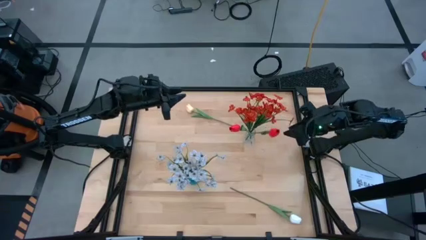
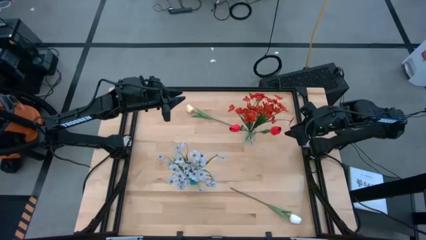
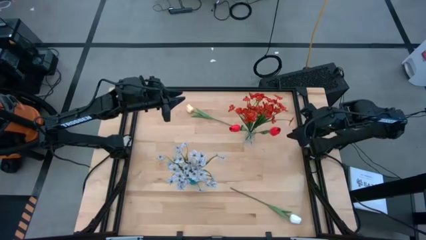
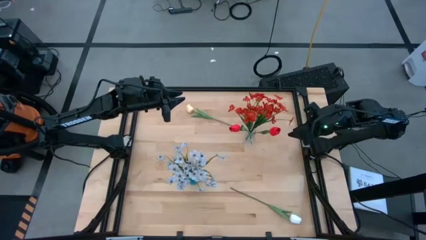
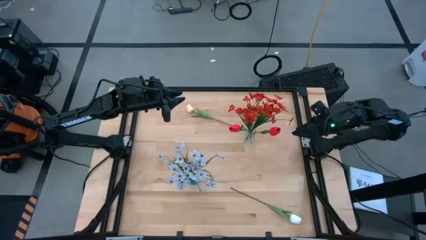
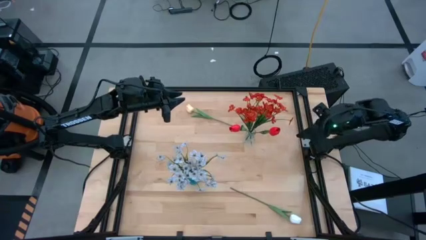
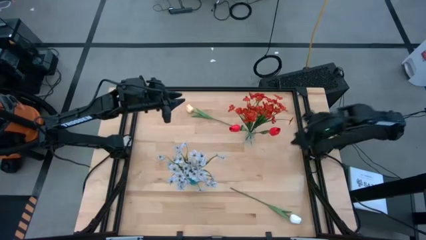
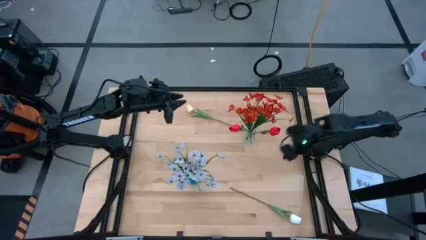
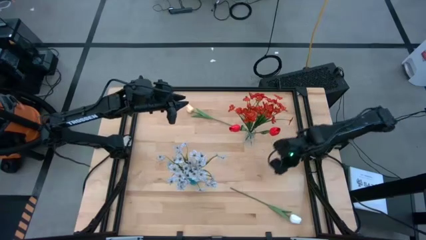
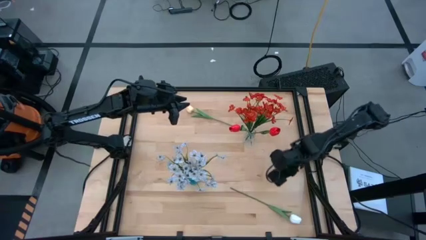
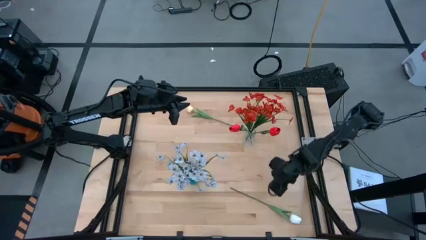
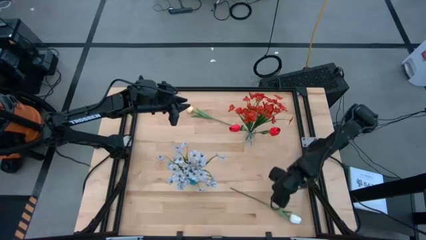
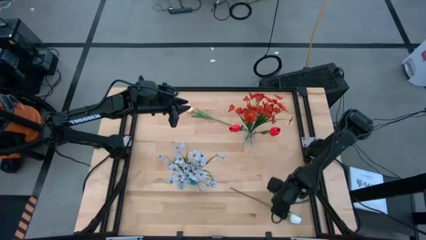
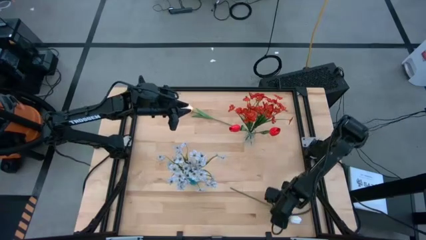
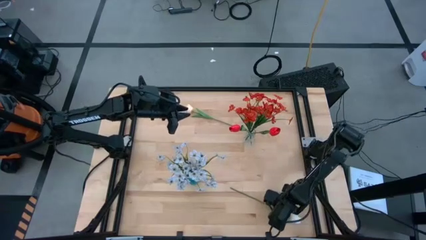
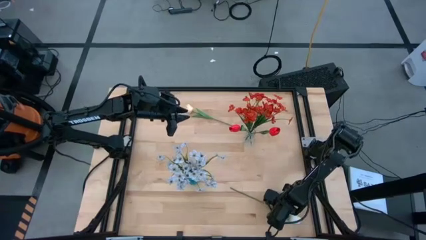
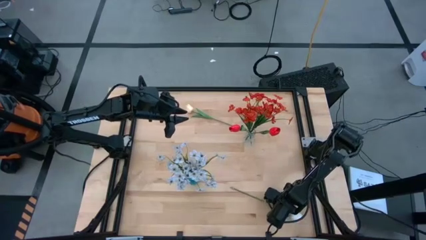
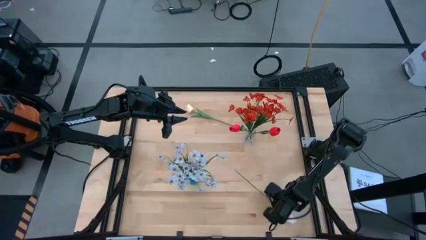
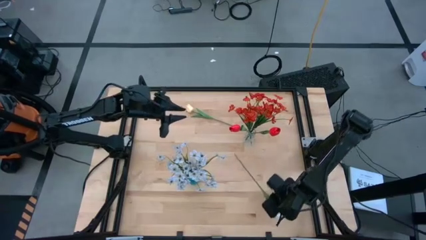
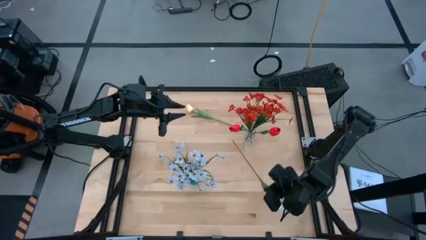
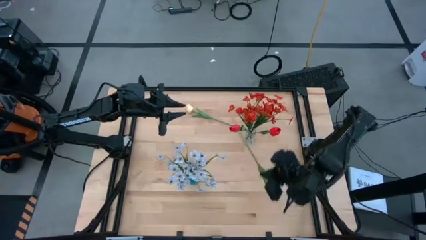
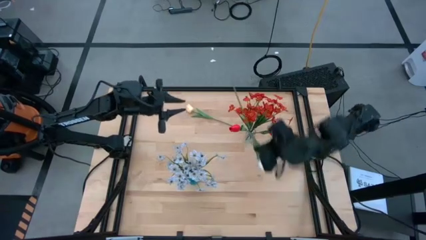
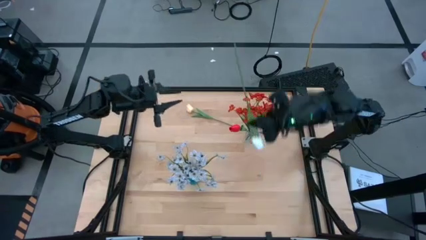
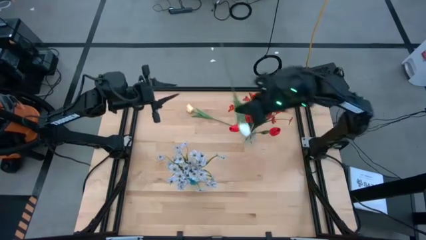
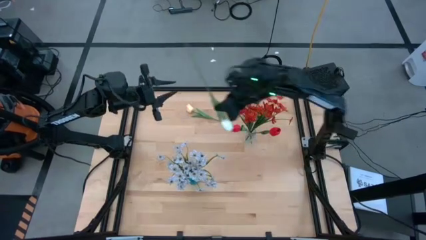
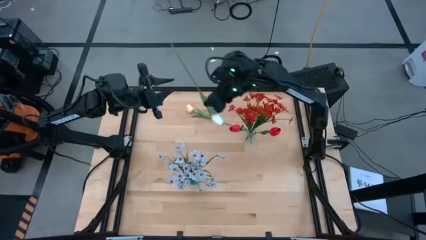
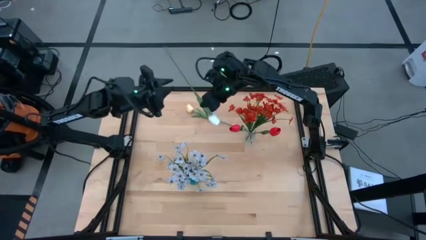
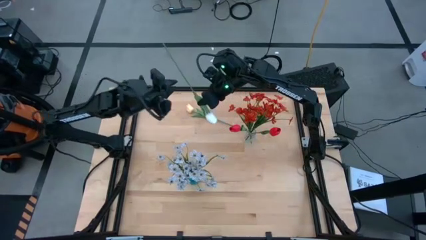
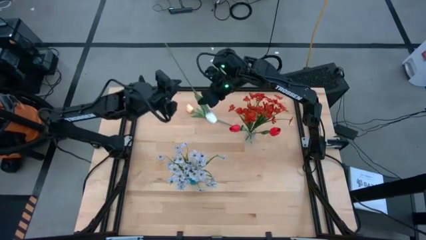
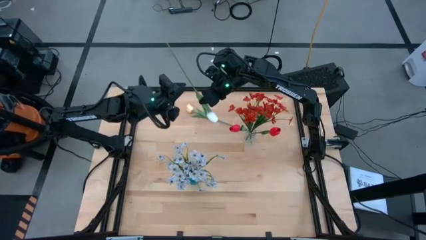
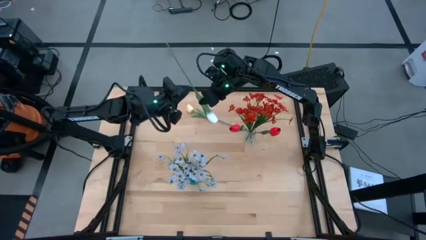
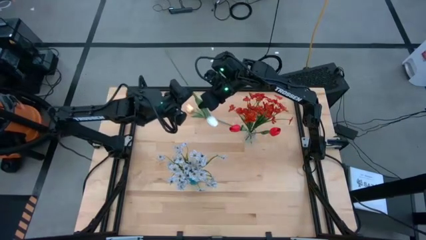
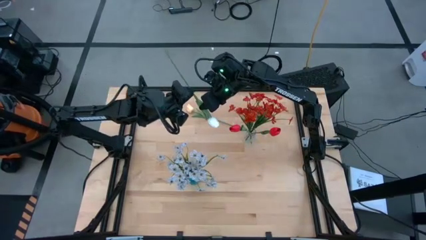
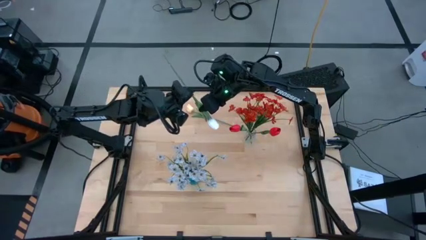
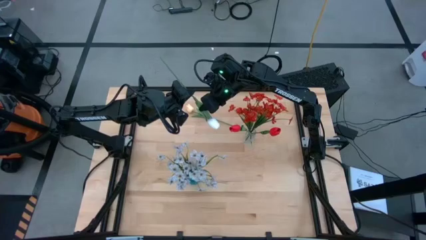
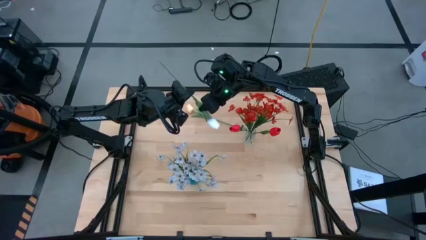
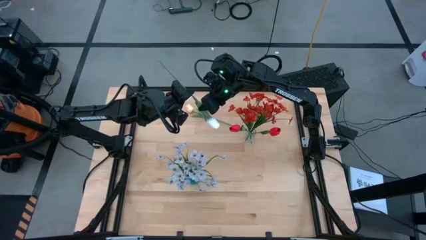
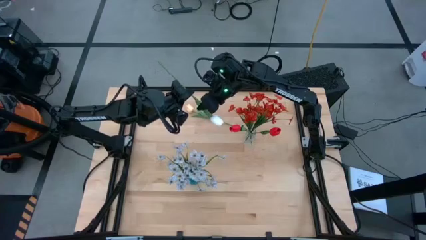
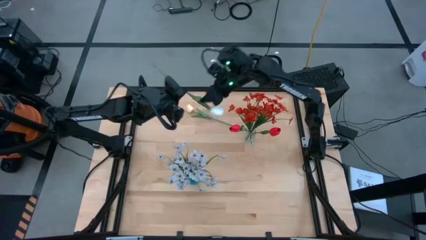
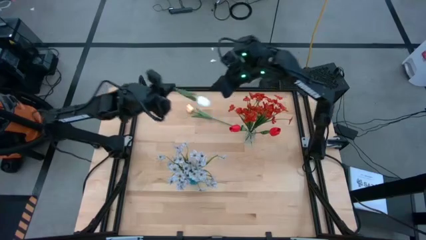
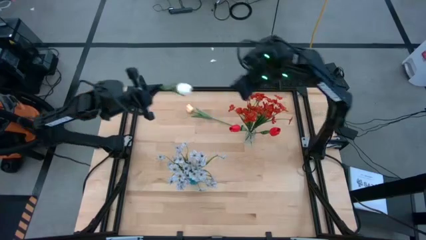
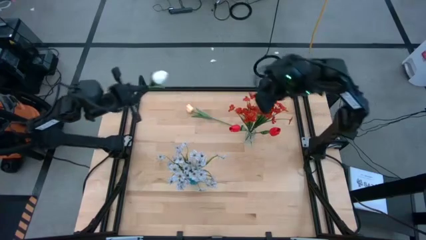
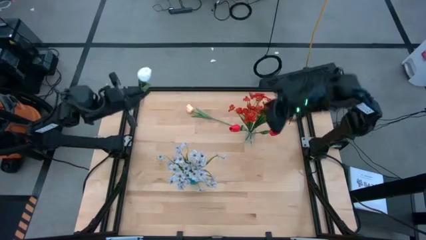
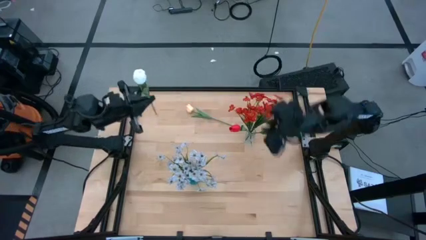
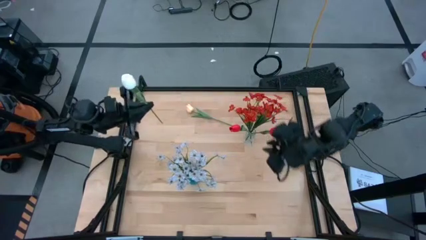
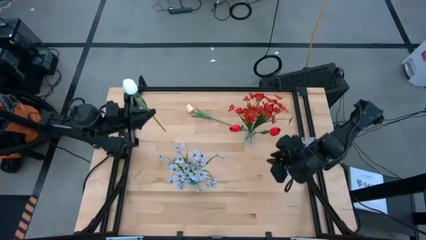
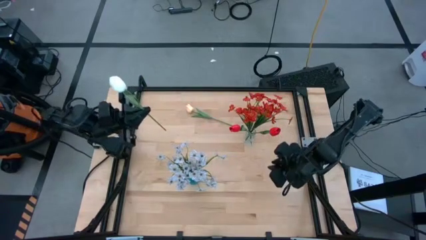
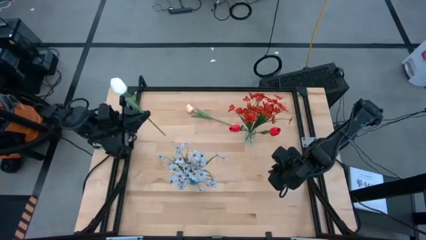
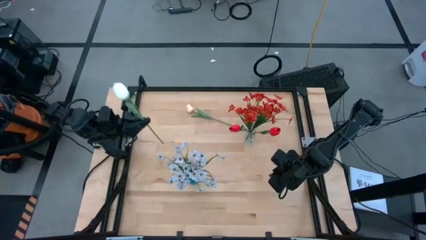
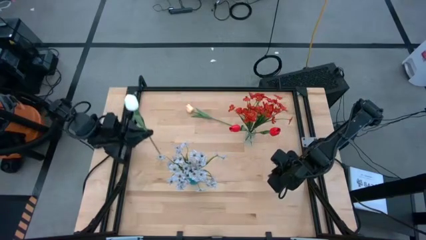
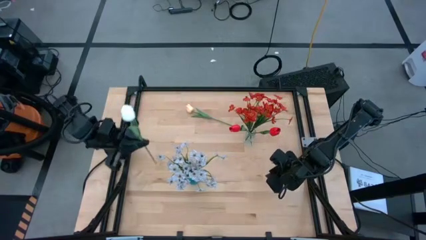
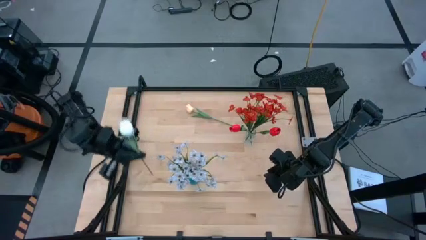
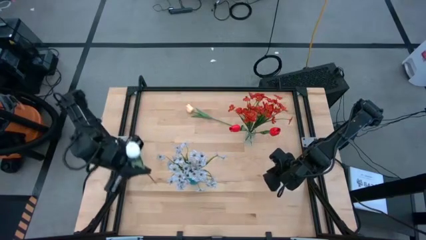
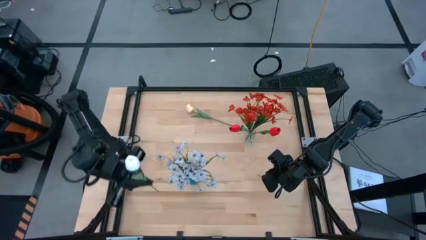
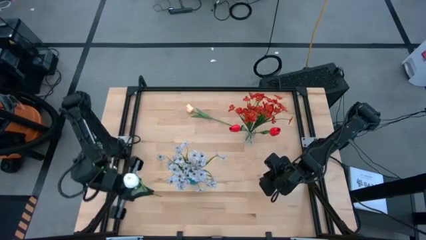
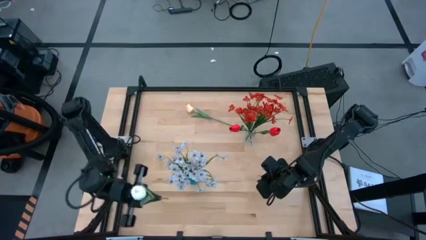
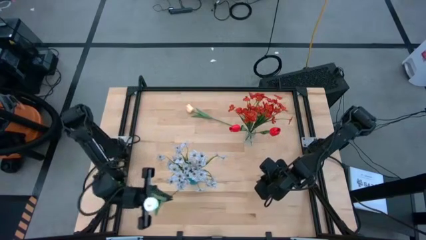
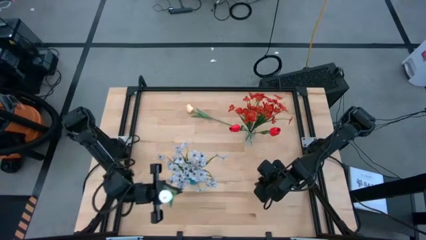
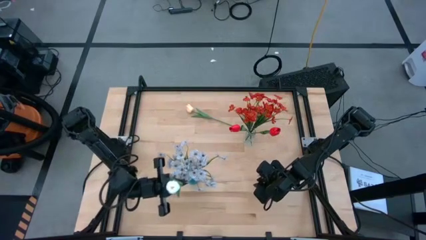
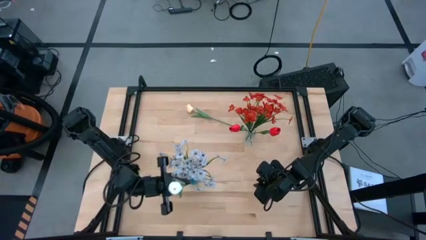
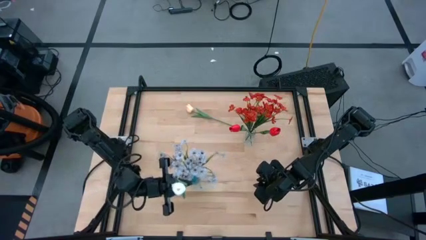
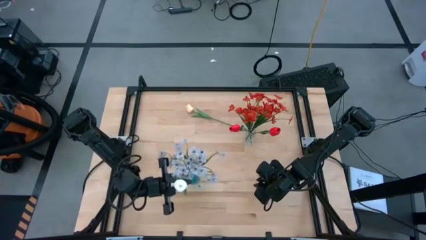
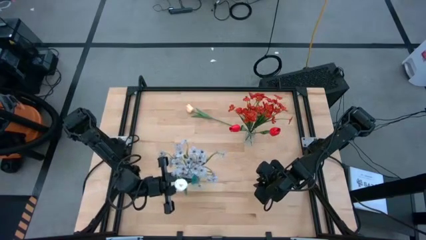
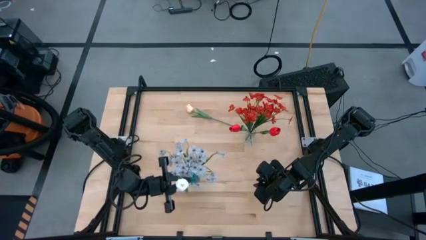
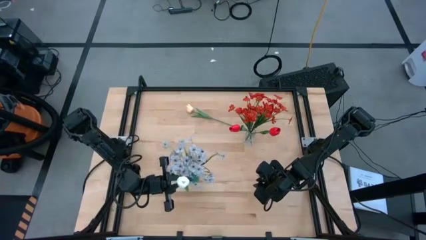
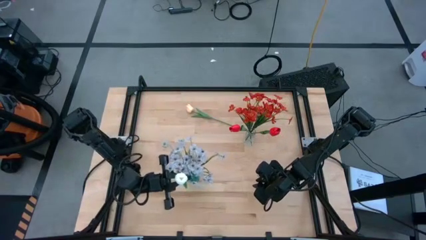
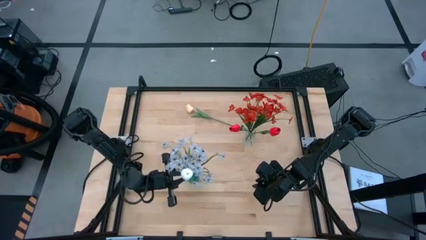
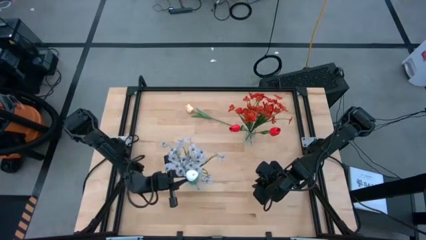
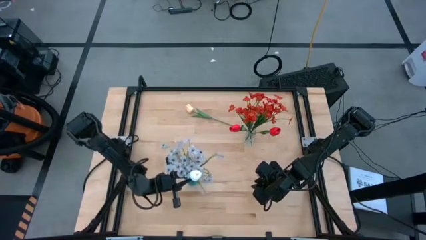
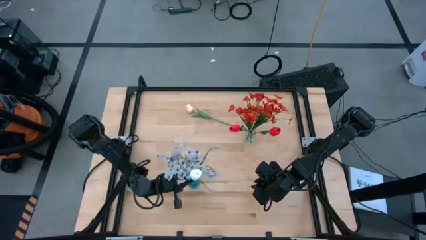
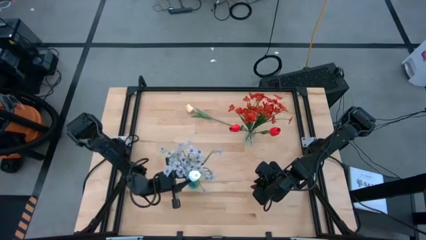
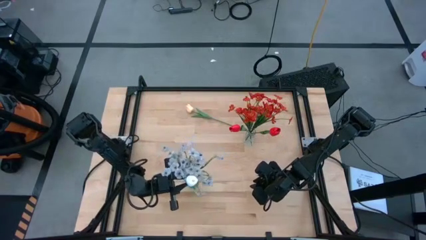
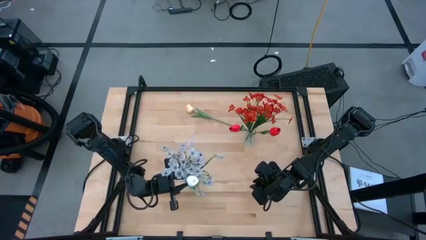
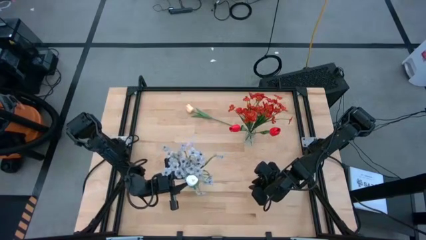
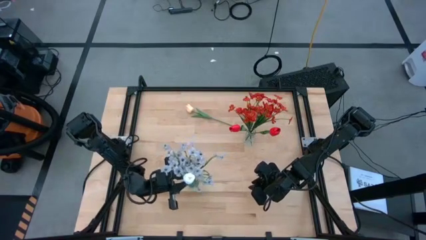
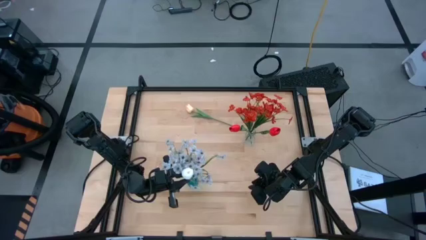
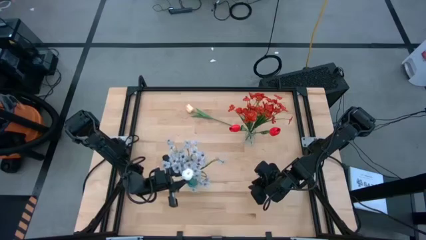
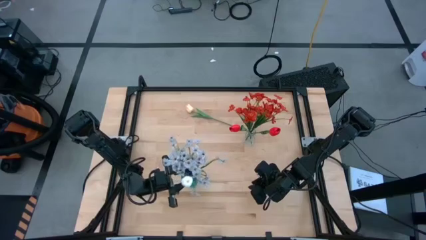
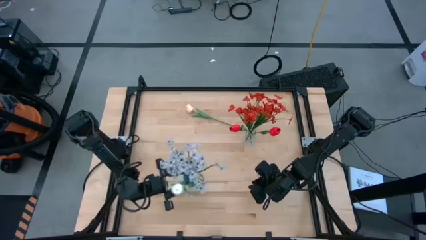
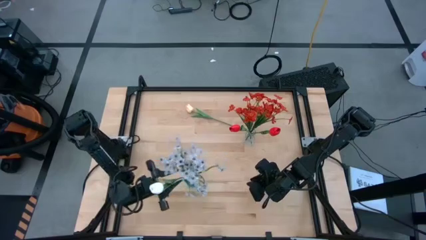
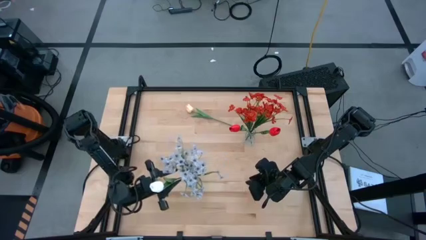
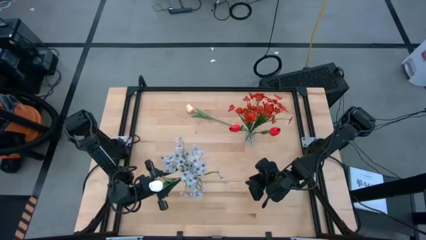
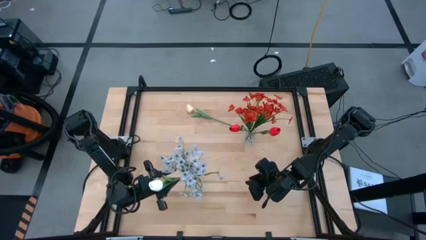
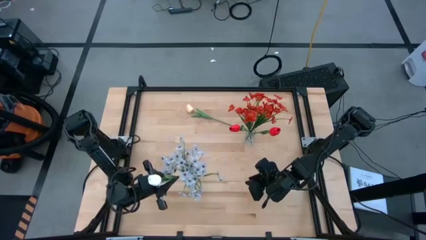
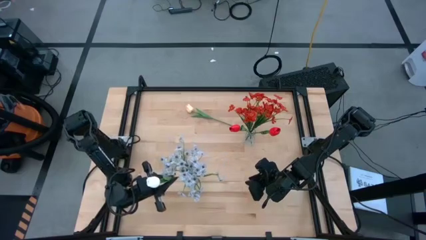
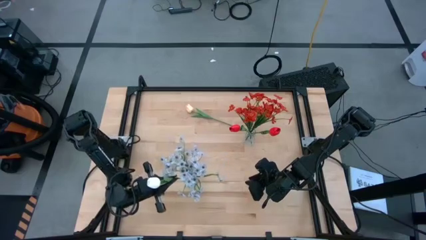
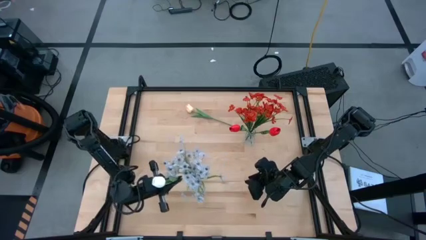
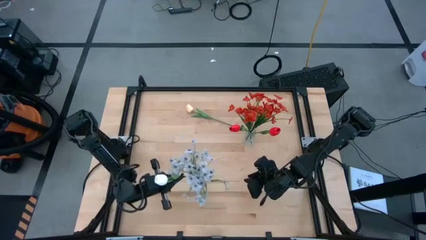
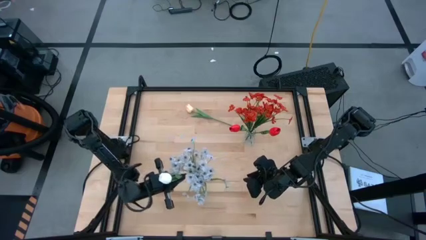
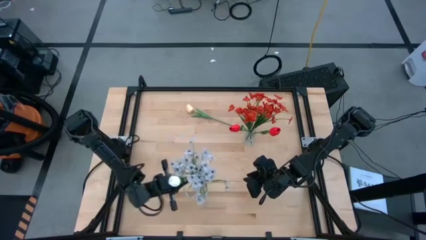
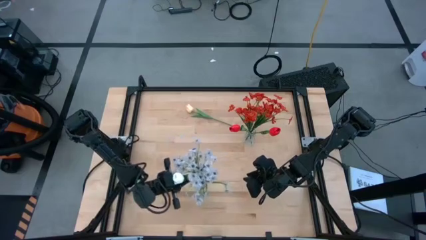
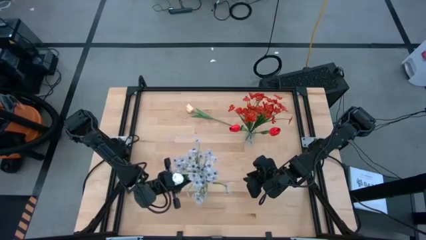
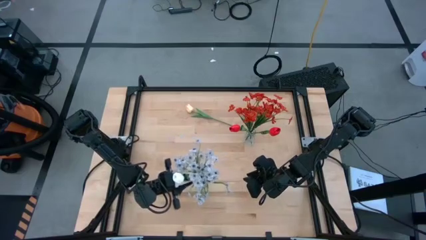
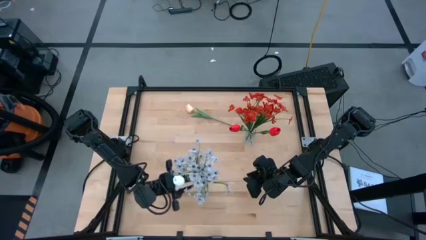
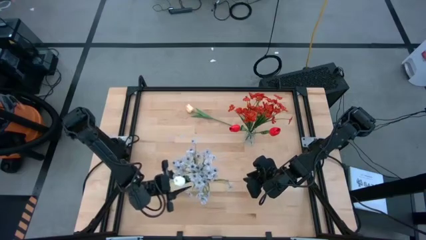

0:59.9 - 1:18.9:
Task: Sort flowers into vase by color
Put the white flower into the flower vase
